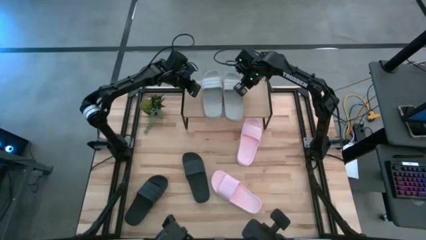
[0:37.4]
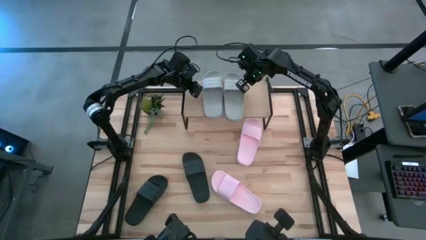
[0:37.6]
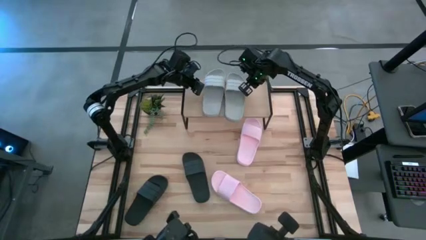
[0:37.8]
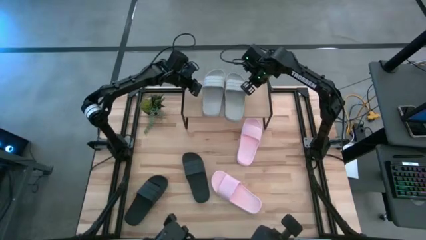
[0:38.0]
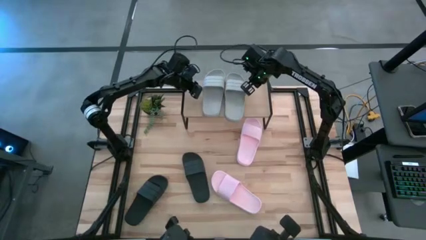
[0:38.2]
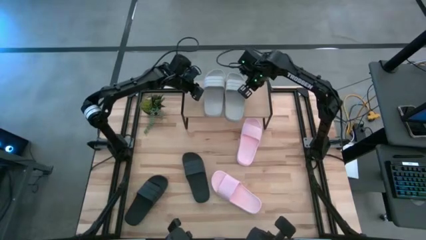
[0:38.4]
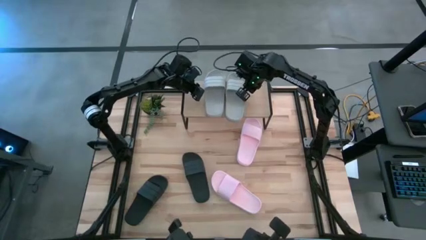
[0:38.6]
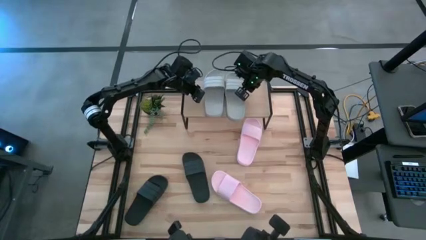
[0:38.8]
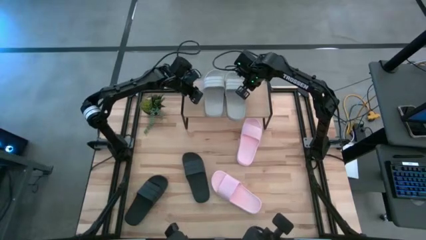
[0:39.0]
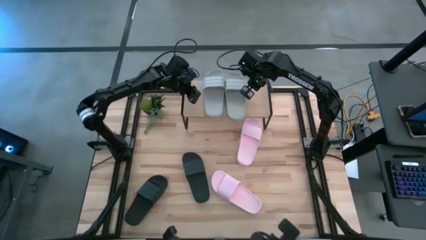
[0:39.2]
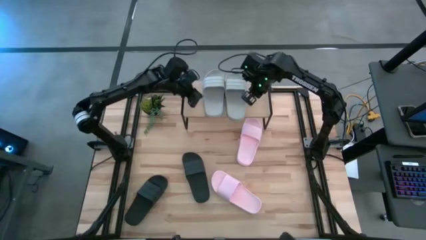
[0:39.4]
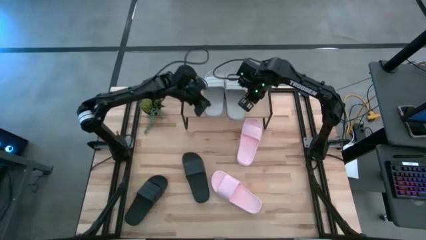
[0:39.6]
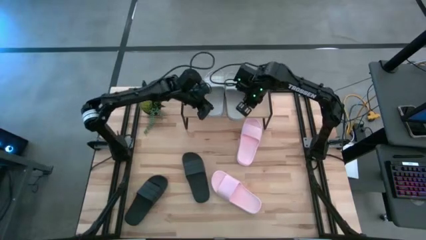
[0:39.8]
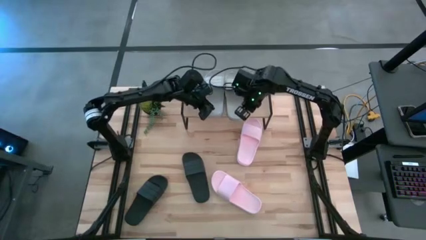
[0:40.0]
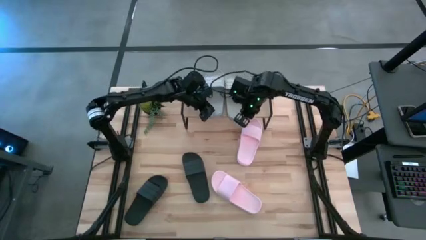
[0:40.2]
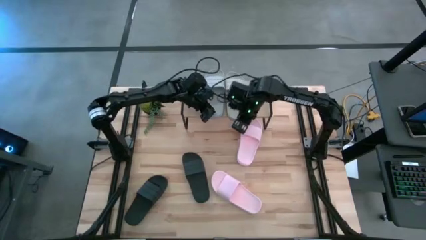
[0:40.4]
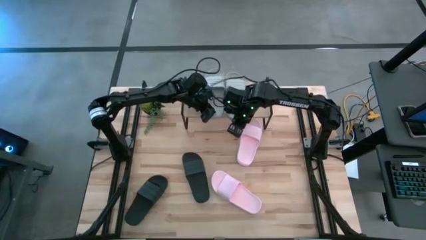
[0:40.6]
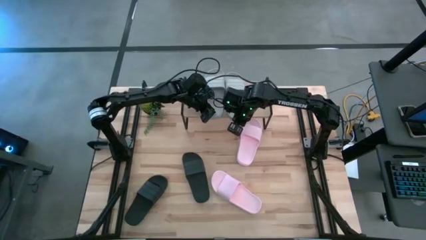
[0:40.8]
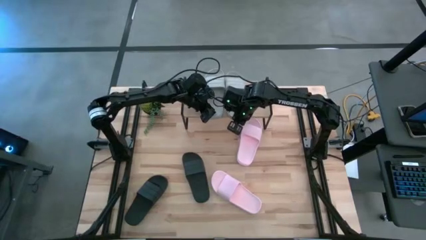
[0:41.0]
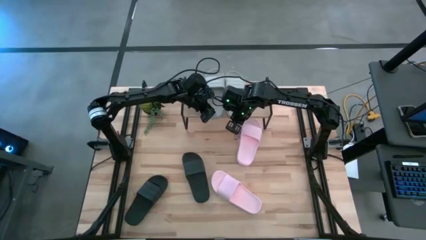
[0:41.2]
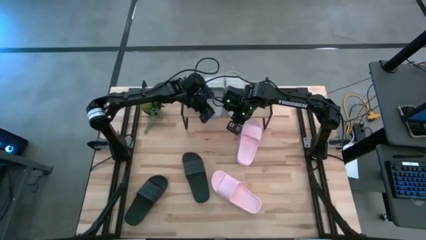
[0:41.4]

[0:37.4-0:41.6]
Task: Pick and place slides into the shelf
Adjust the gray slides on the shelf

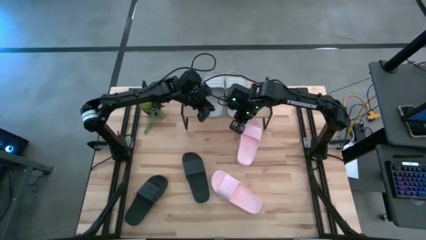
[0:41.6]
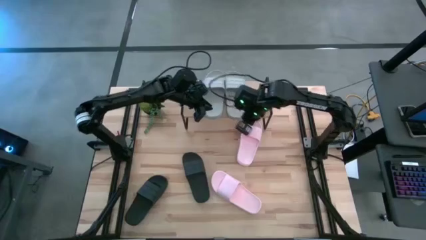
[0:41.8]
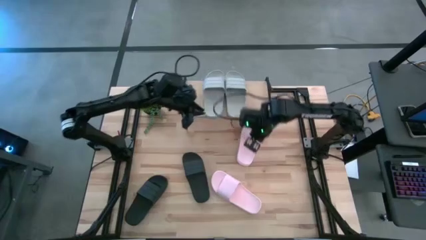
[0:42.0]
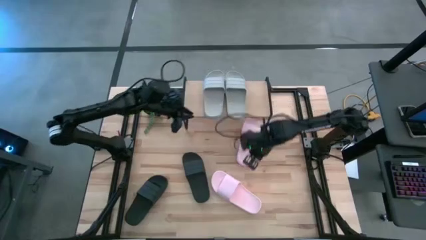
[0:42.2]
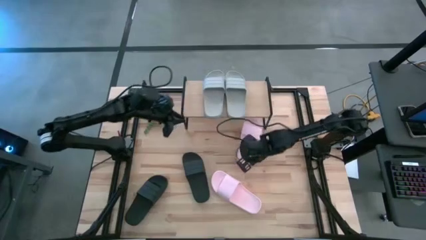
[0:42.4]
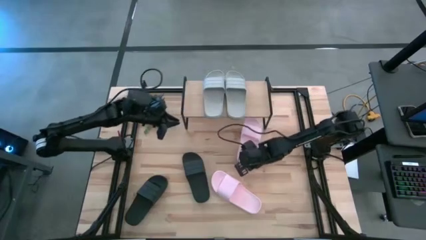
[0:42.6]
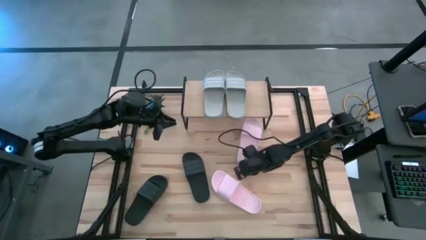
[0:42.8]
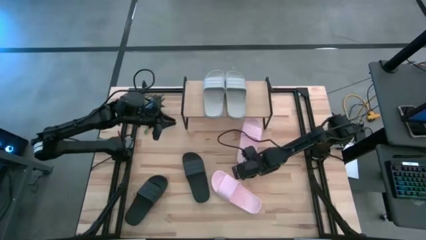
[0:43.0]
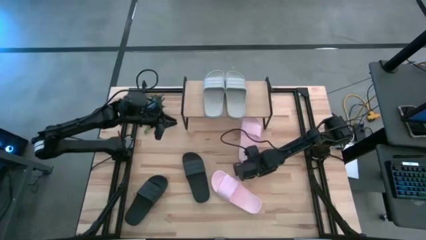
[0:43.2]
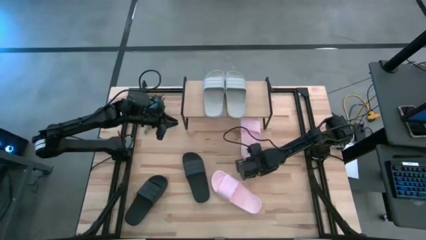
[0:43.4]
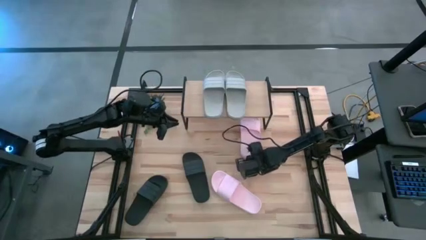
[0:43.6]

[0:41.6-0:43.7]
Adjust the top pink slide under the shelf

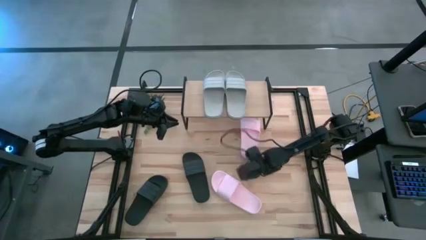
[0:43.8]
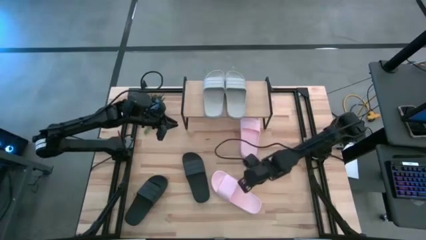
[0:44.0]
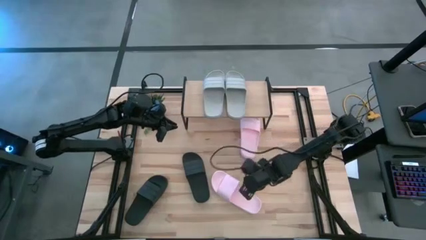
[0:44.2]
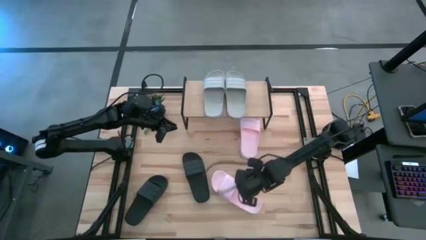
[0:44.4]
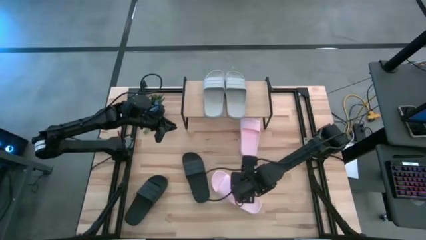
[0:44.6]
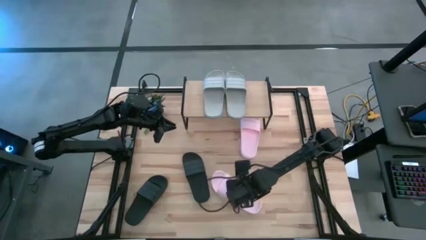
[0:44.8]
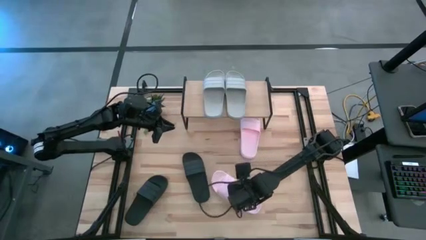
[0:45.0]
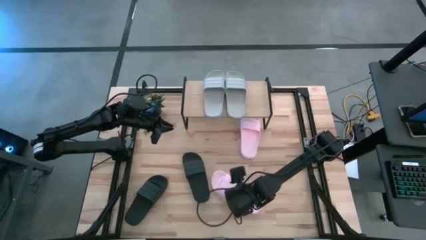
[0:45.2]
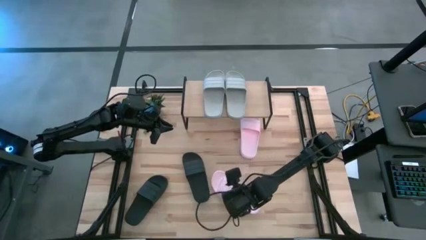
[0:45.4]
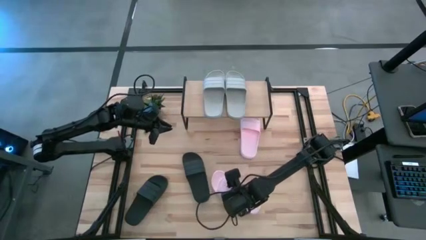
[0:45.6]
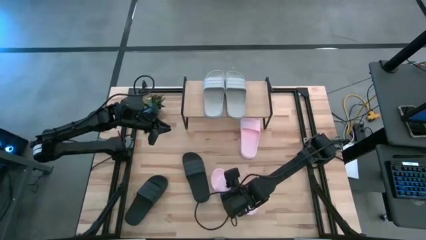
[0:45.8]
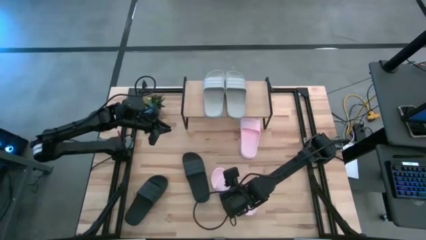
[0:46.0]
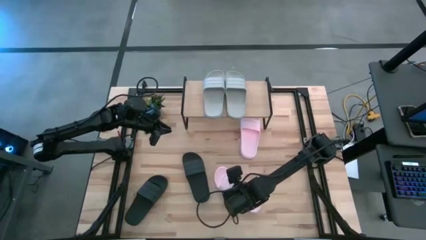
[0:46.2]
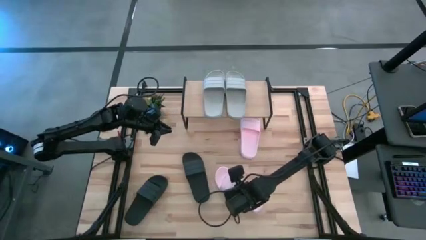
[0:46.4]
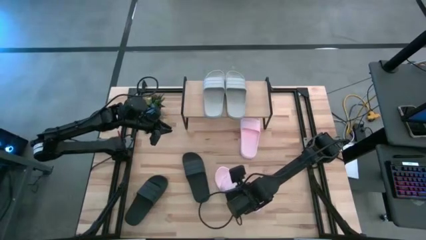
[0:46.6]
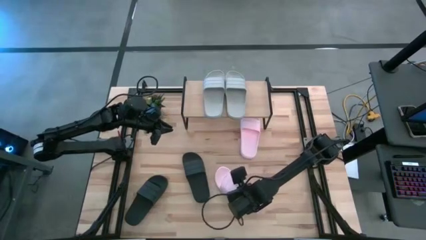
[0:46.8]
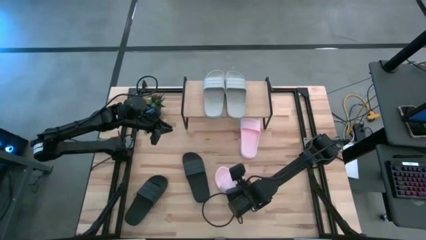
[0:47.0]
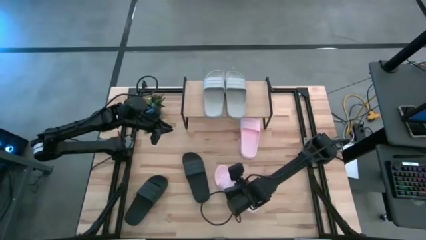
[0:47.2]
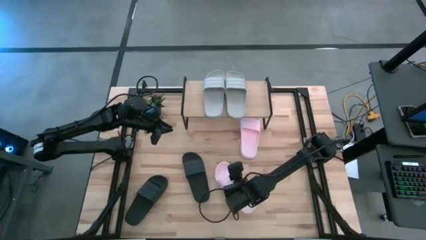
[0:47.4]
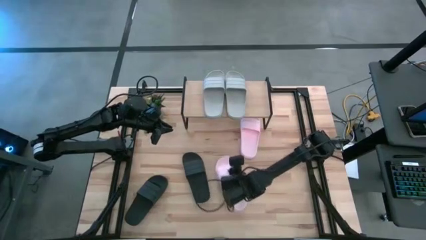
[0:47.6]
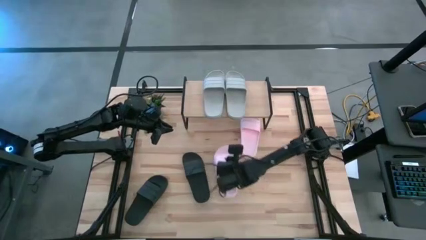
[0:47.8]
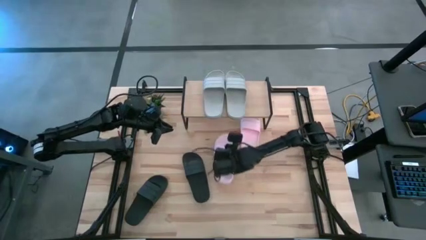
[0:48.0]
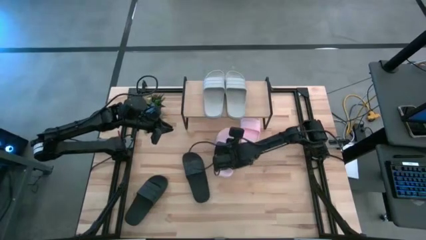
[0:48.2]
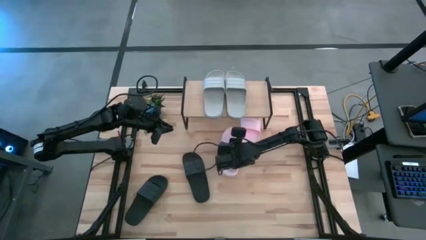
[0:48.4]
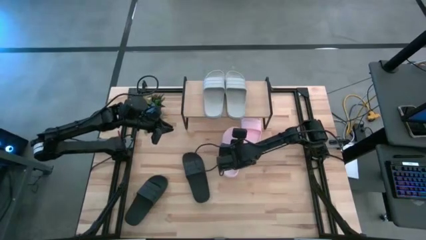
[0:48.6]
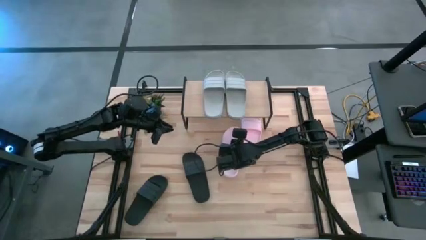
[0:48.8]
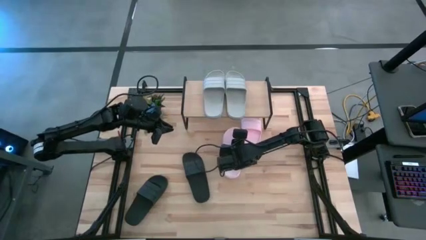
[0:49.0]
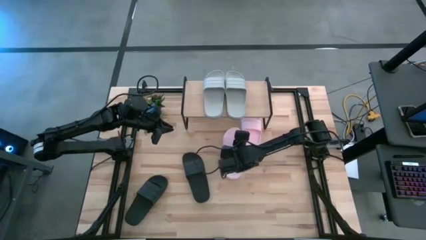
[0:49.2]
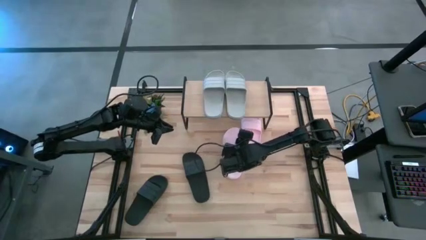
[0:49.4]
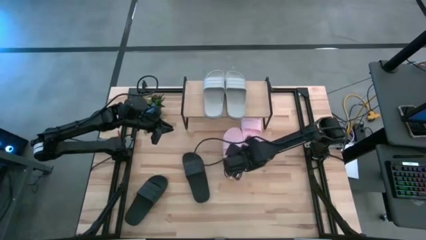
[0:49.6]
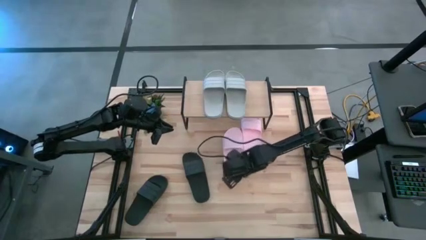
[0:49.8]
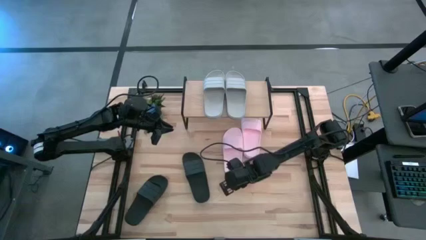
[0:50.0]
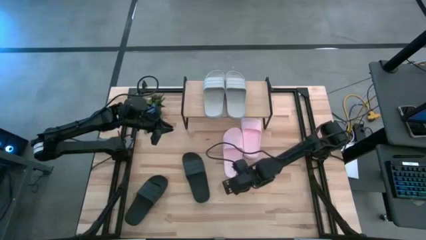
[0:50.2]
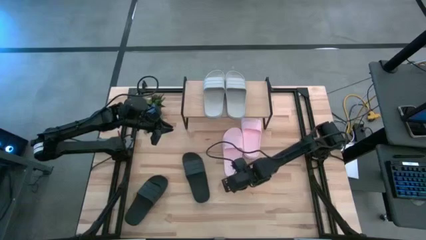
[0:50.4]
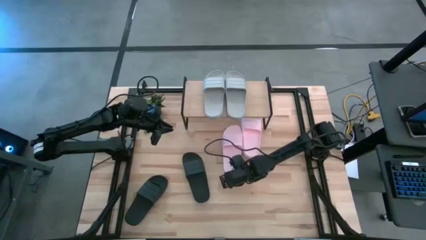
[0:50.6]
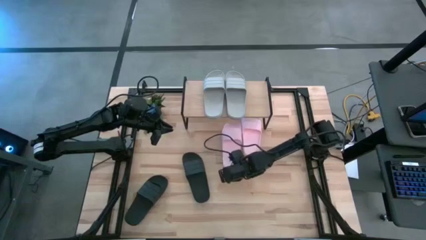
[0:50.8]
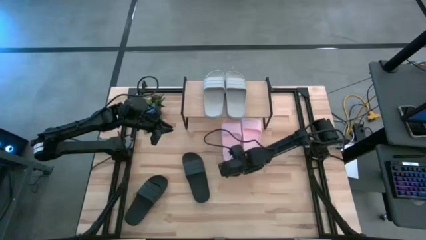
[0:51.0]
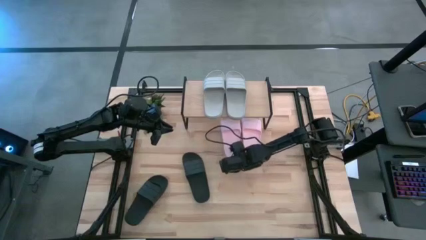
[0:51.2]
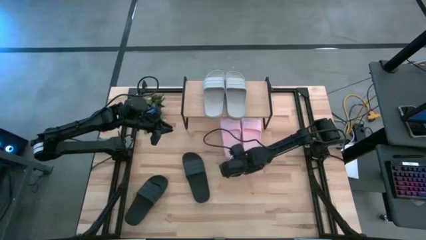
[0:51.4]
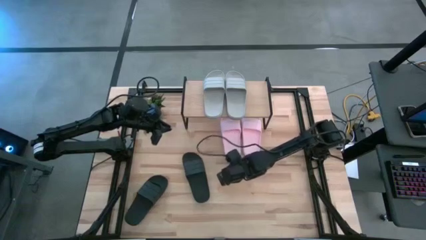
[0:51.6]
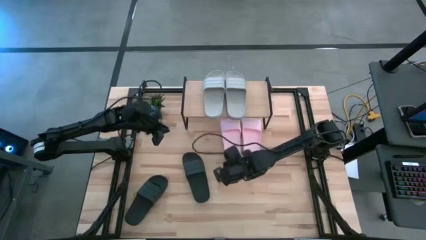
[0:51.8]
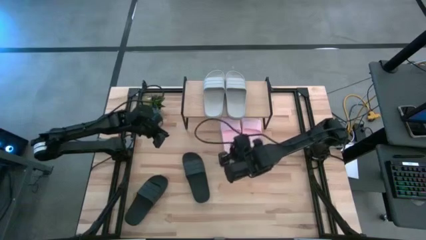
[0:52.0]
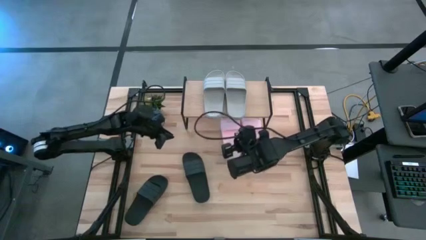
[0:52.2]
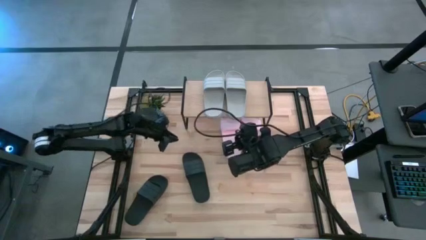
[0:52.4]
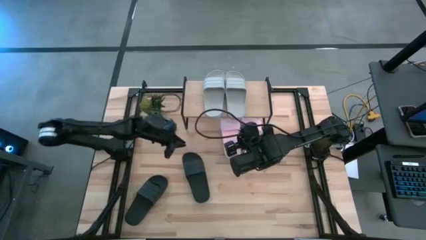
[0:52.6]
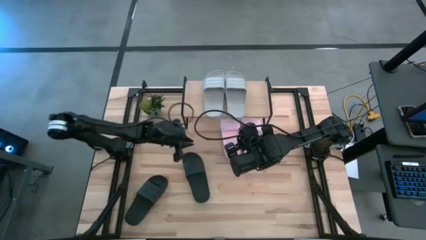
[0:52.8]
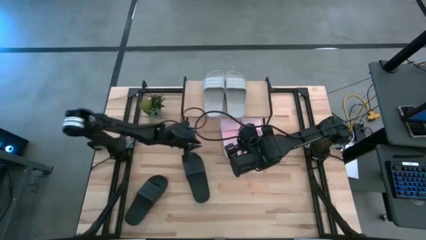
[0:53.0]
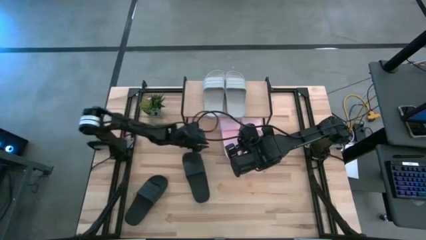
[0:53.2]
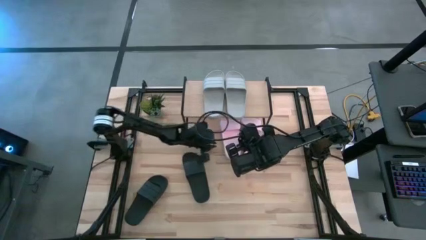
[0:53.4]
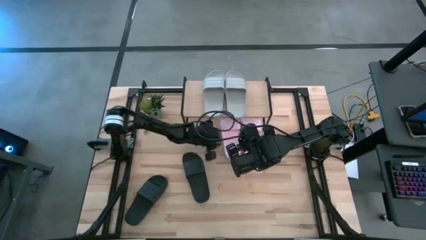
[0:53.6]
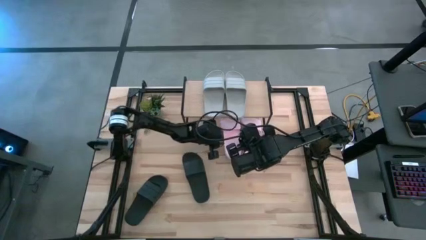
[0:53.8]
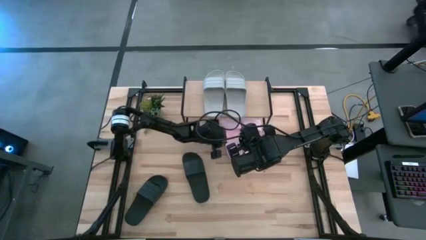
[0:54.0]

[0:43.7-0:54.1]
Put the pink slide under the shelf
